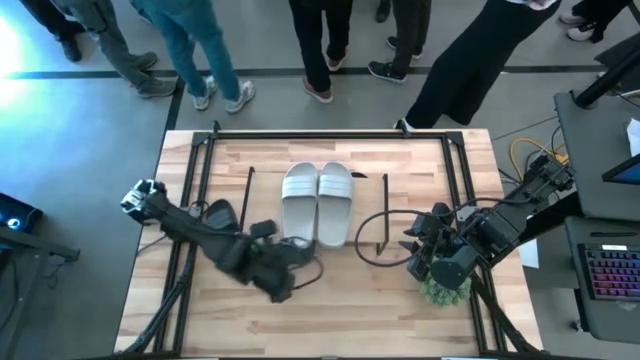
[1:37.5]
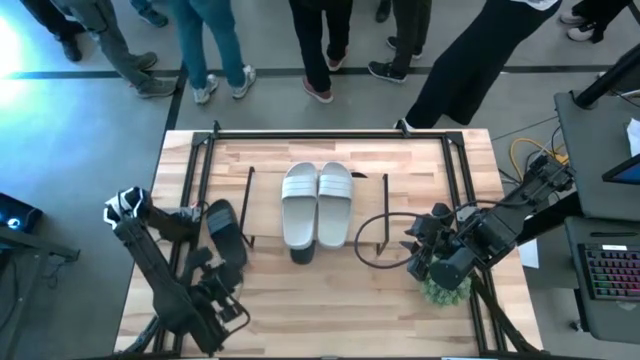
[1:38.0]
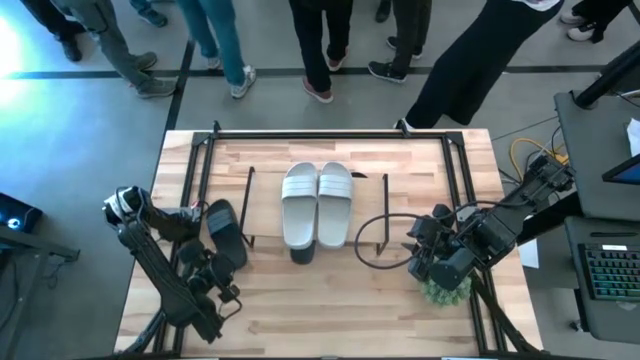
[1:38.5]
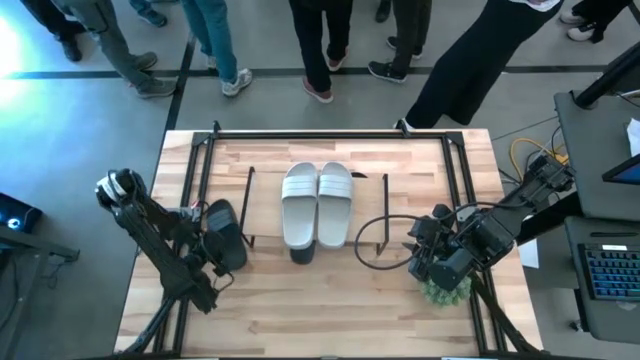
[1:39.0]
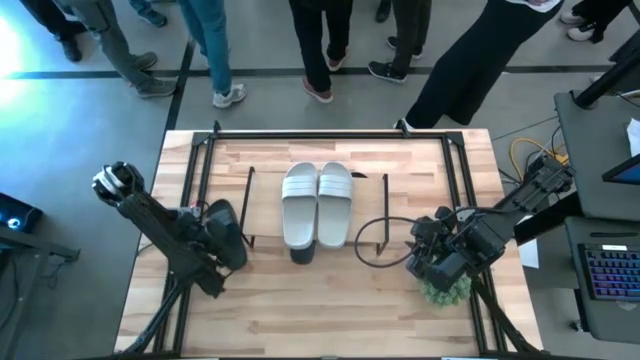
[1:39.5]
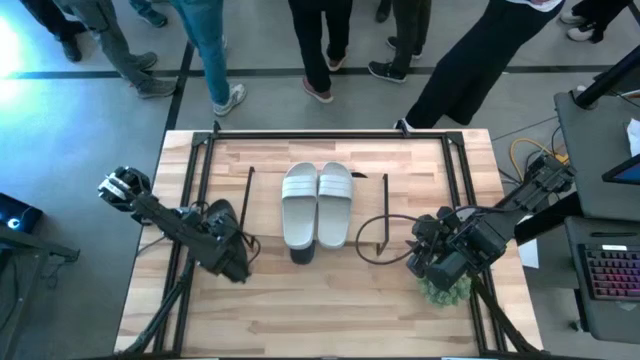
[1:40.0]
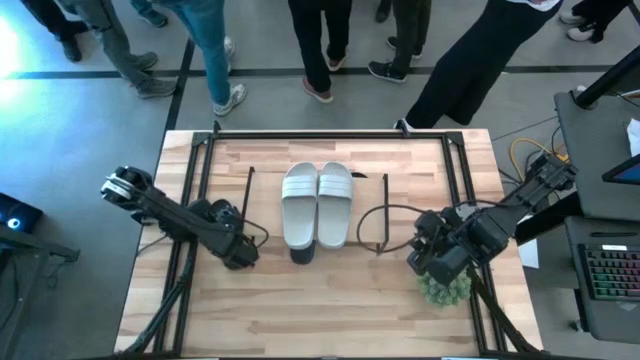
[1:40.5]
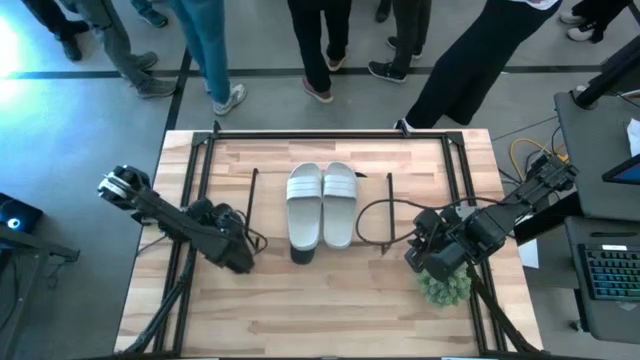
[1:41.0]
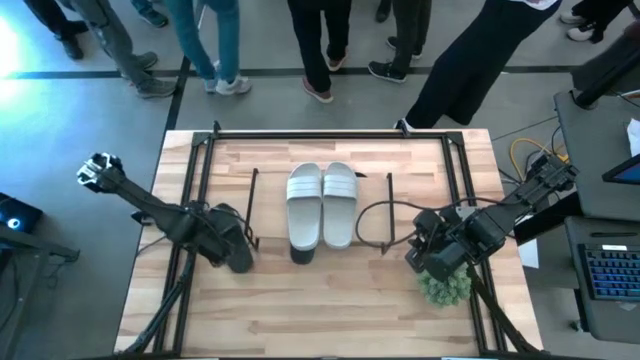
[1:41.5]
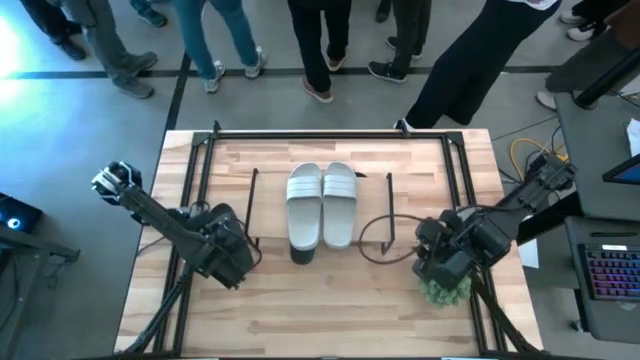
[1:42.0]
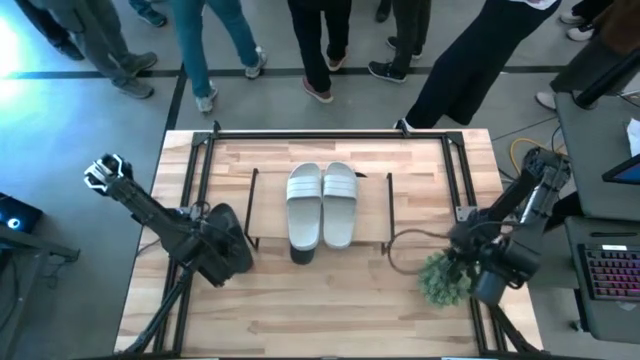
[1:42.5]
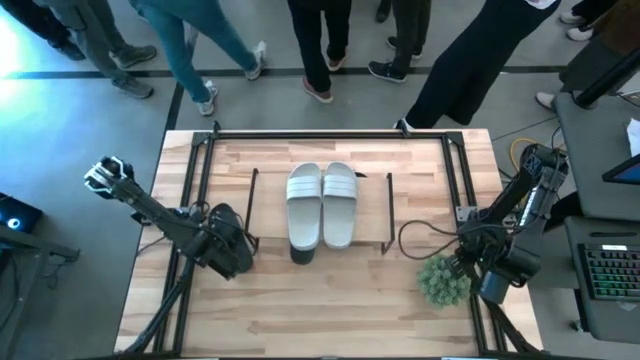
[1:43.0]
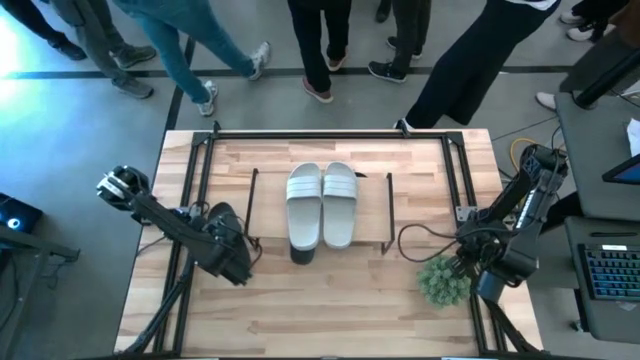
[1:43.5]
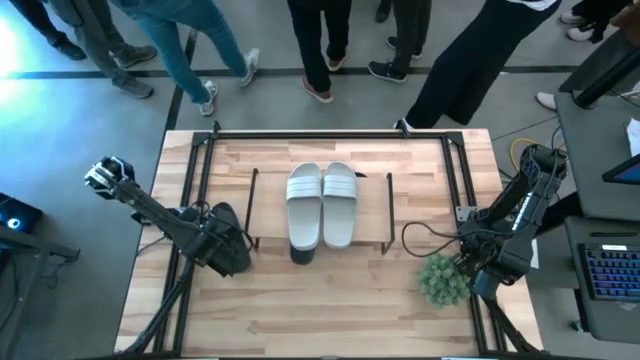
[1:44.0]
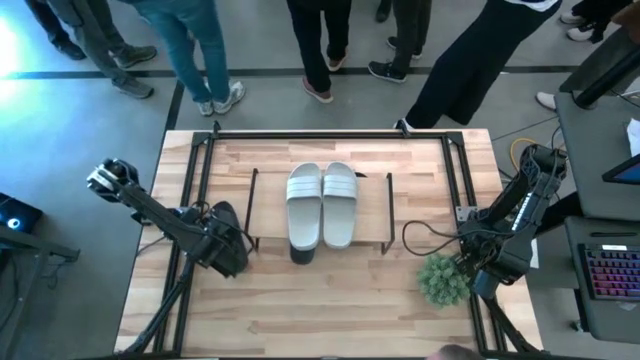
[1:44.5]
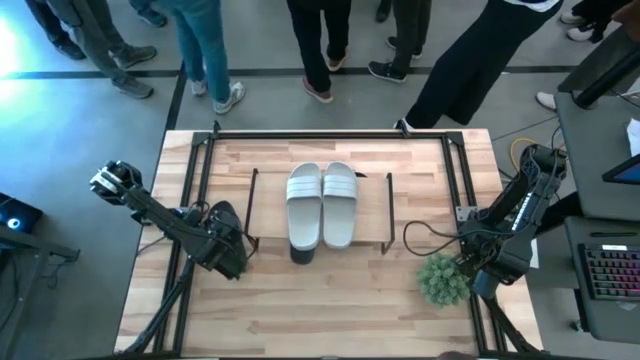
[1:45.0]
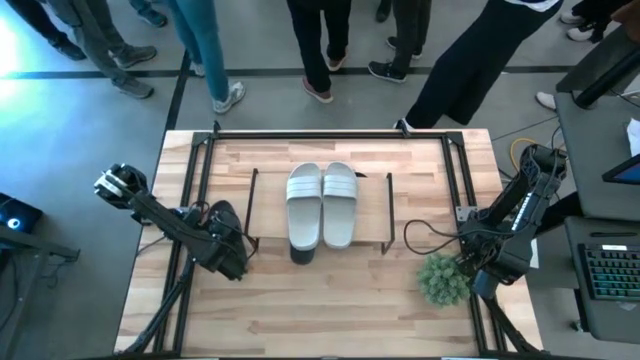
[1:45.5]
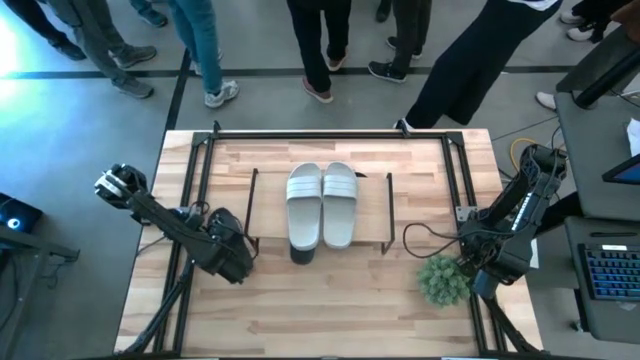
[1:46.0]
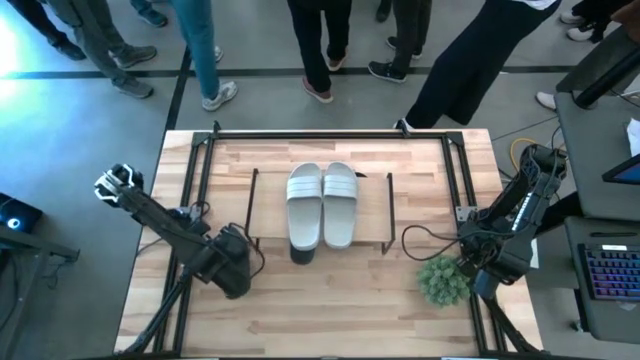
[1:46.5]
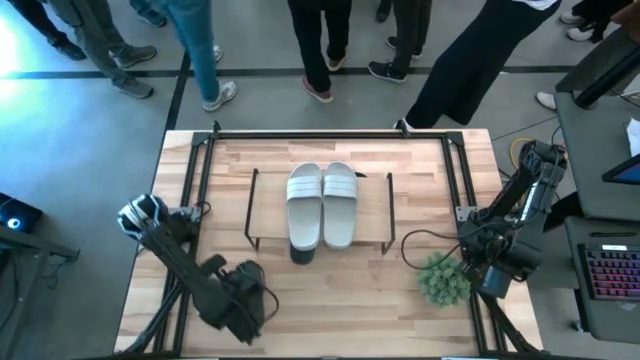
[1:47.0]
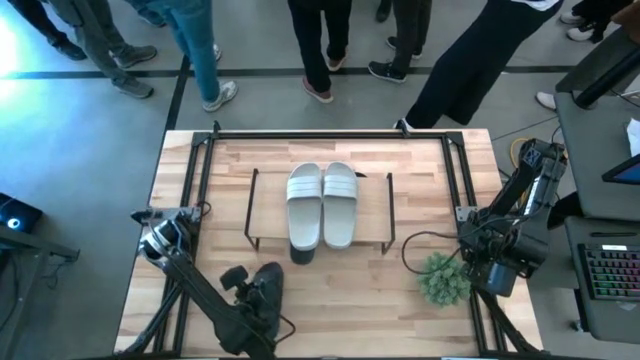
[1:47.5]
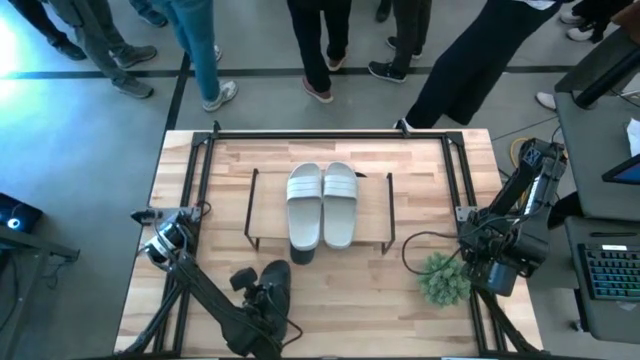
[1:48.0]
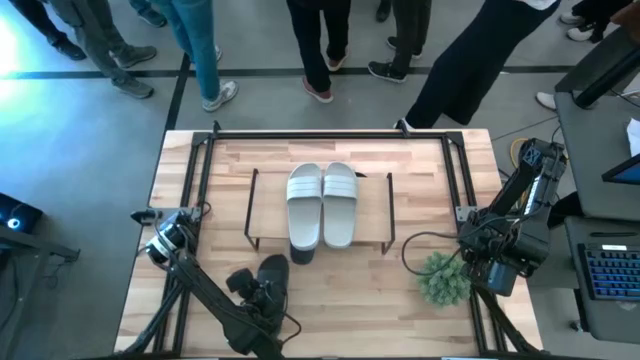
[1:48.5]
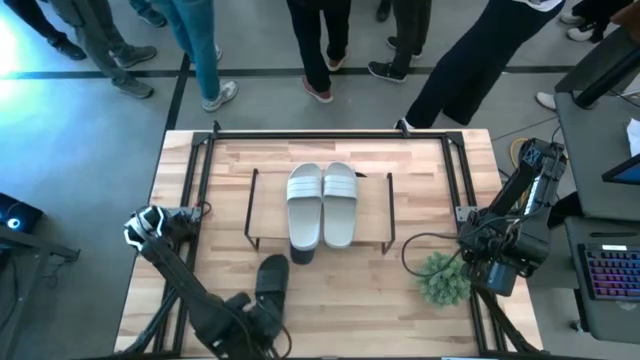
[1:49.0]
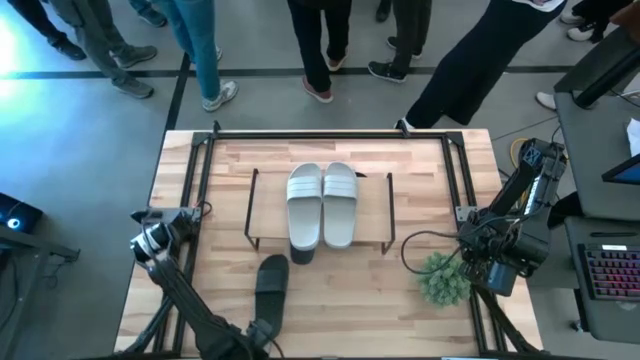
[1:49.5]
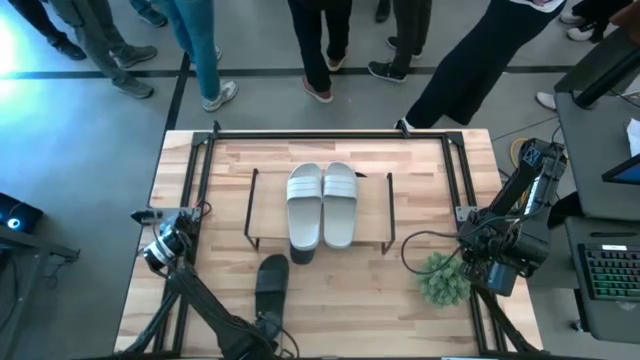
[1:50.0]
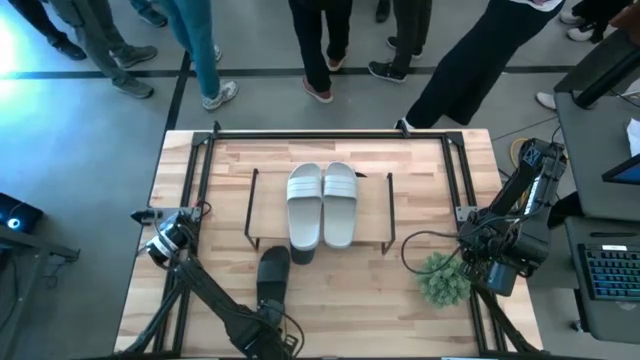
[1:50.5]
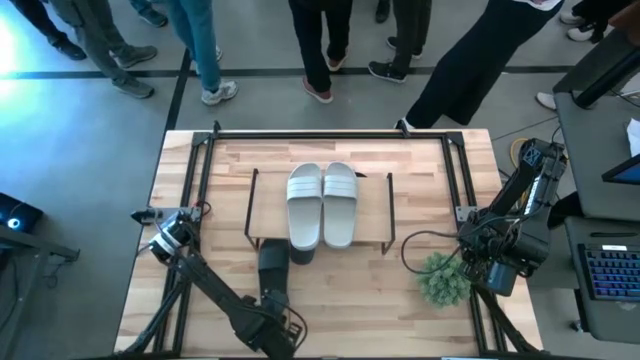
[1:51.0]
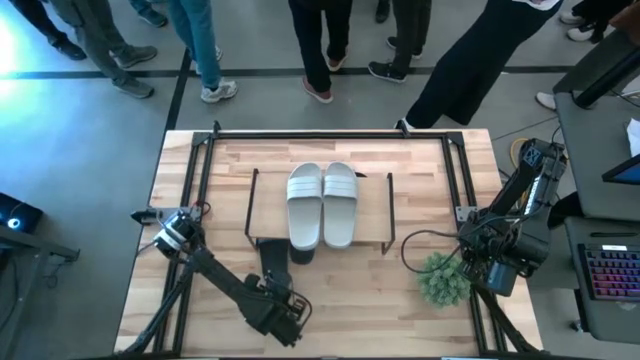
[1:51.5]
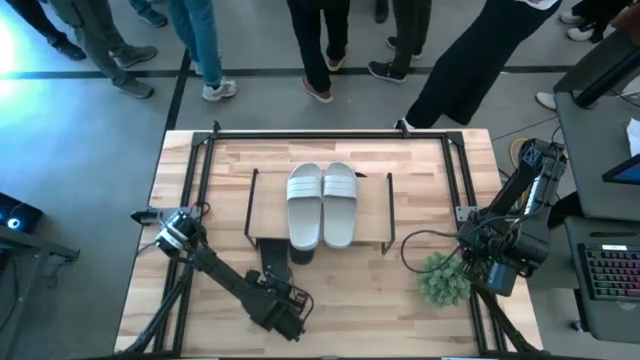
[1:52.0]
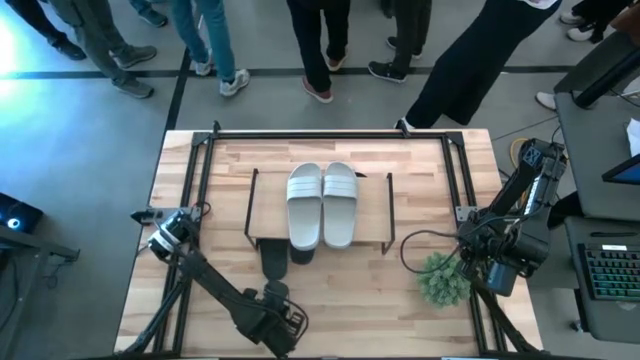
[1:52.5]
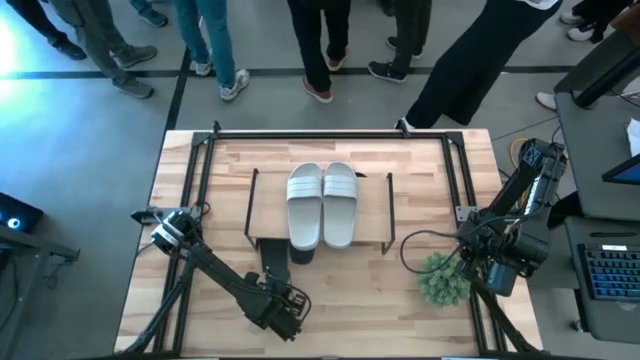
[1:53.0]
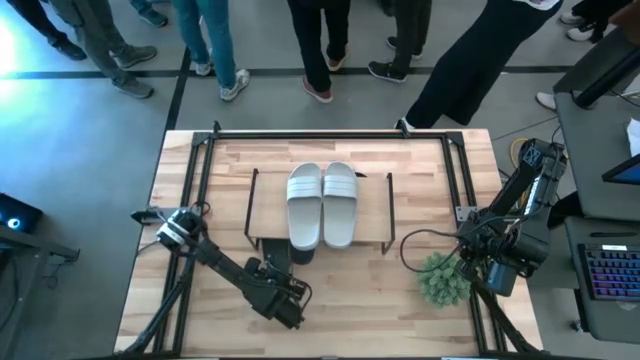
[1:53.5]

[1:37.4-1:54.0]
Task: Pick and place slides into the shelf
Put the black slide under the shelf
